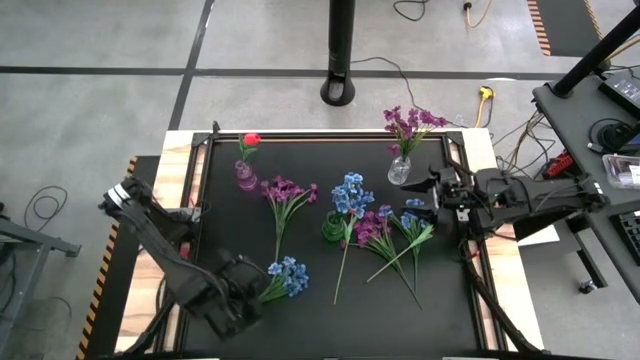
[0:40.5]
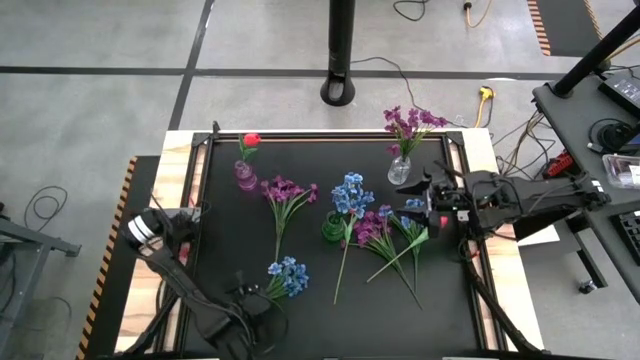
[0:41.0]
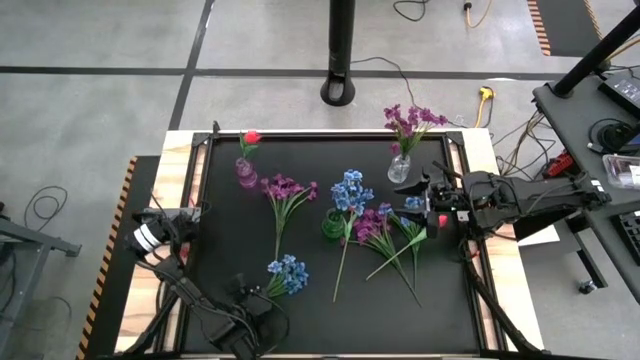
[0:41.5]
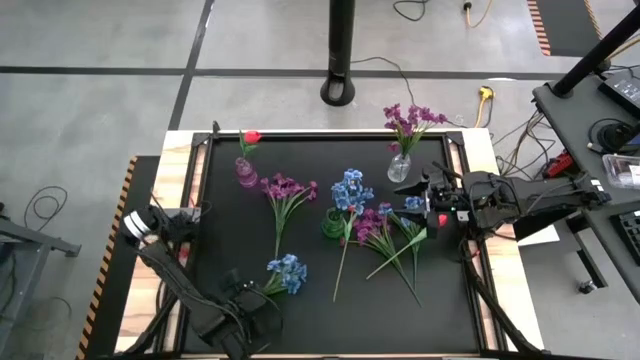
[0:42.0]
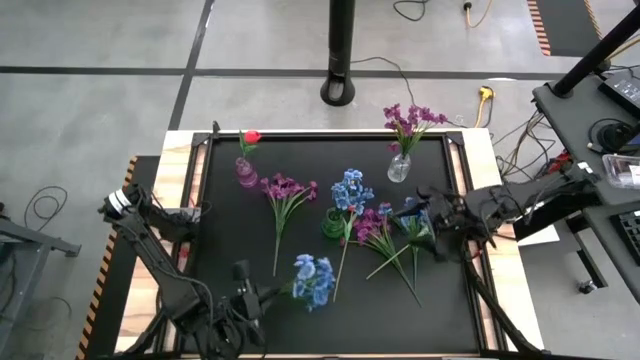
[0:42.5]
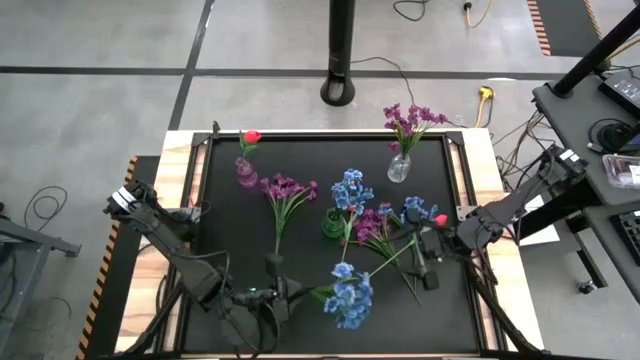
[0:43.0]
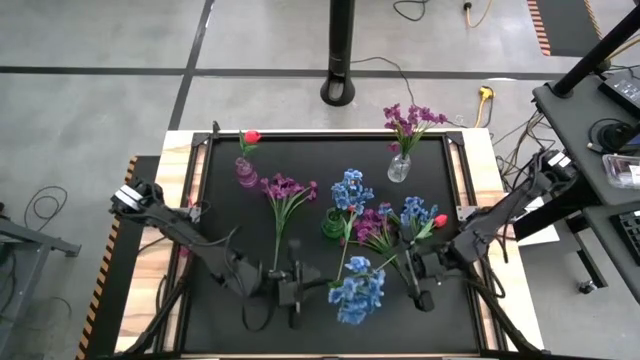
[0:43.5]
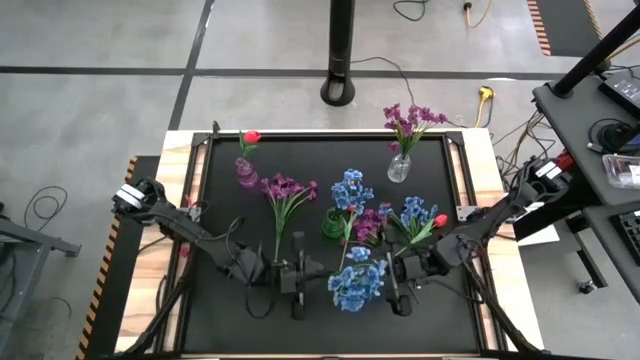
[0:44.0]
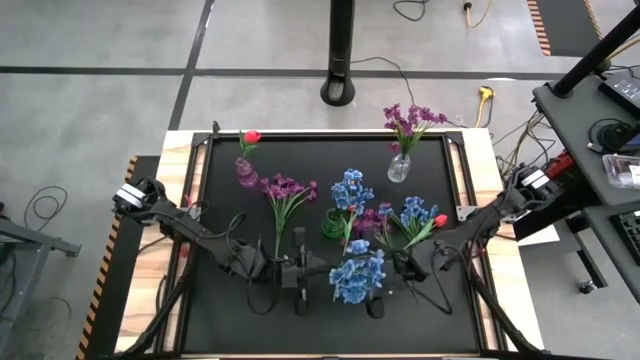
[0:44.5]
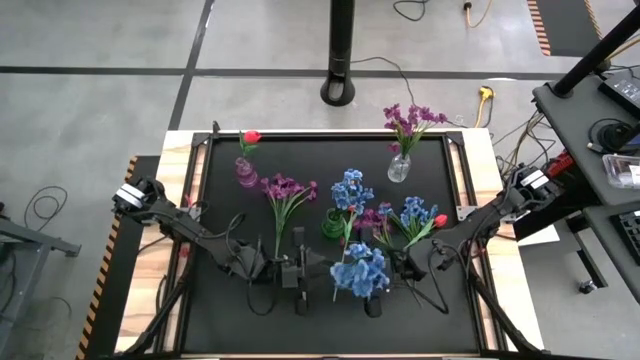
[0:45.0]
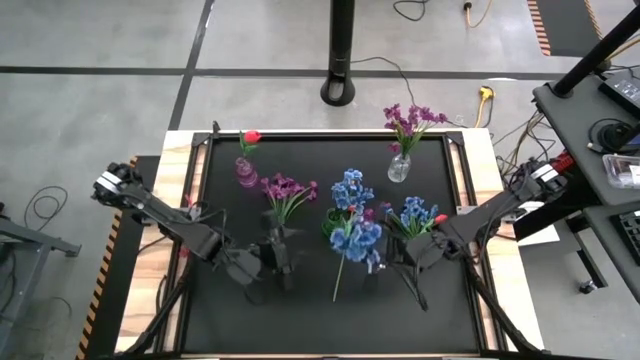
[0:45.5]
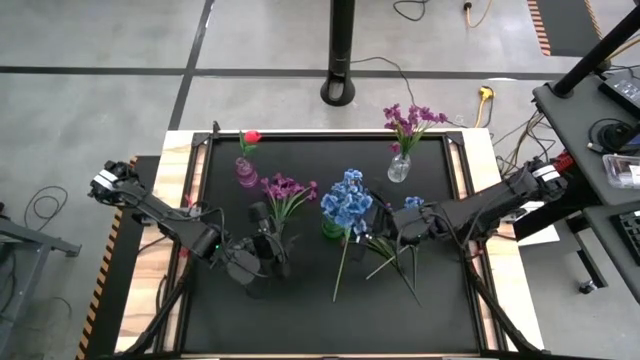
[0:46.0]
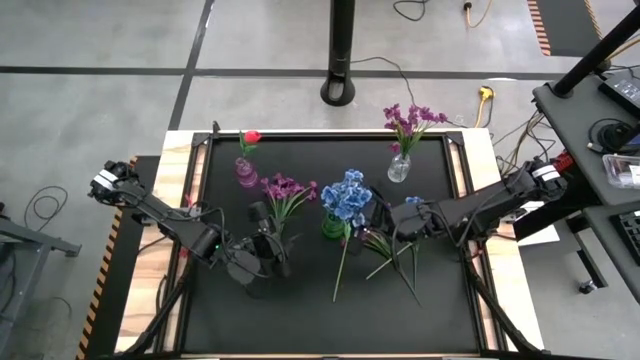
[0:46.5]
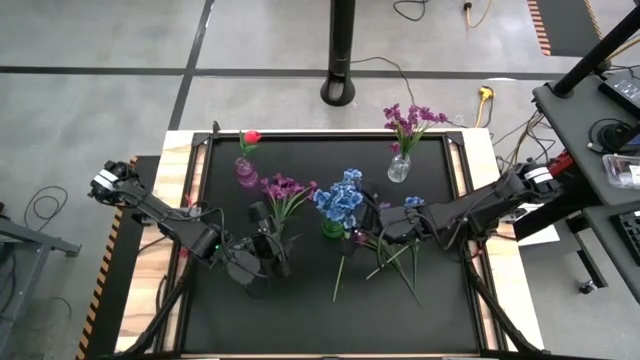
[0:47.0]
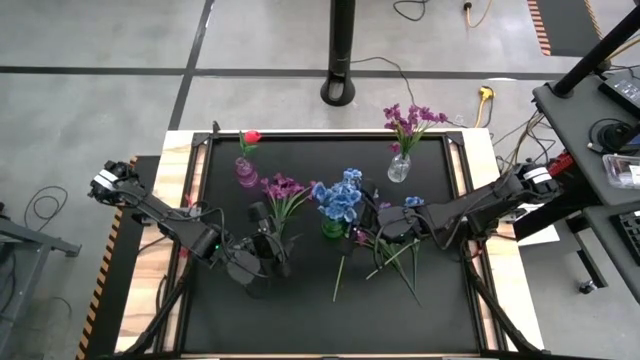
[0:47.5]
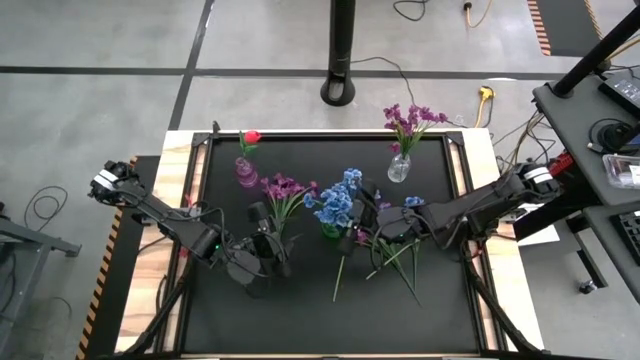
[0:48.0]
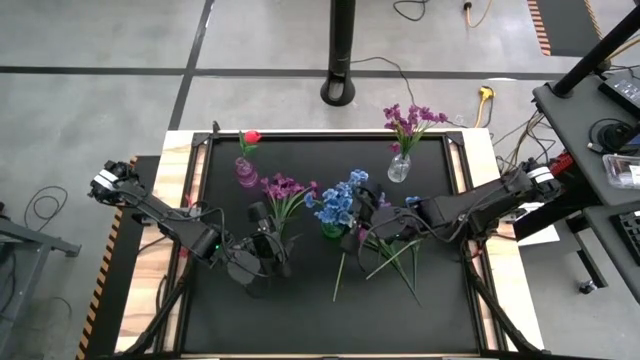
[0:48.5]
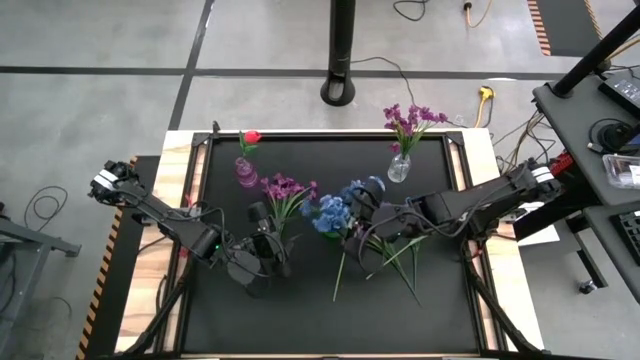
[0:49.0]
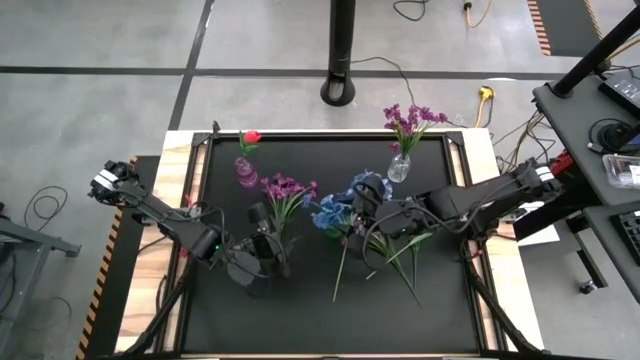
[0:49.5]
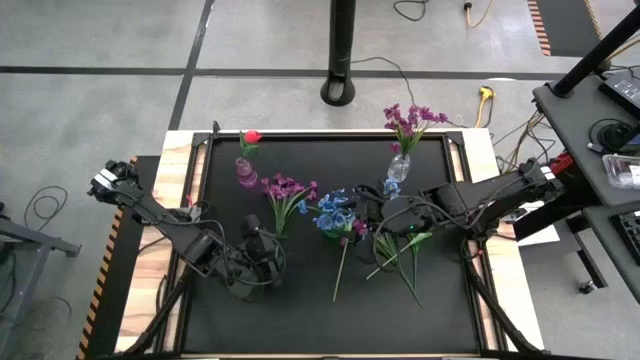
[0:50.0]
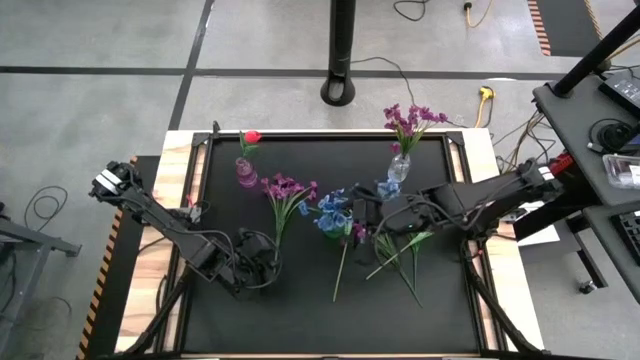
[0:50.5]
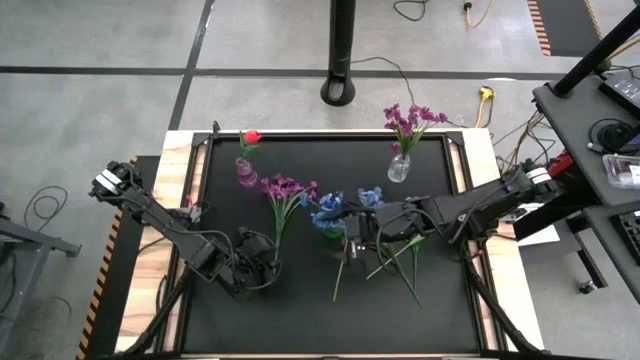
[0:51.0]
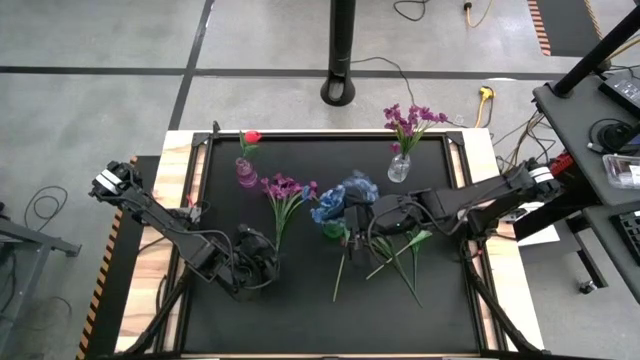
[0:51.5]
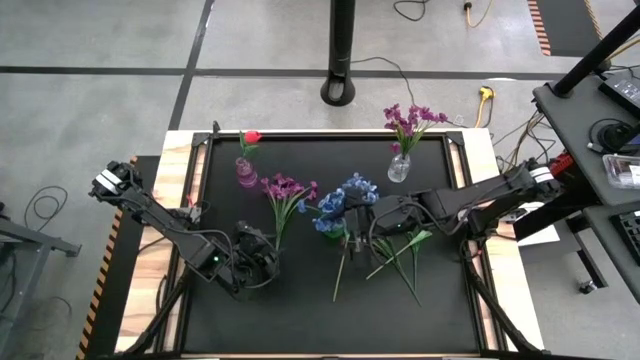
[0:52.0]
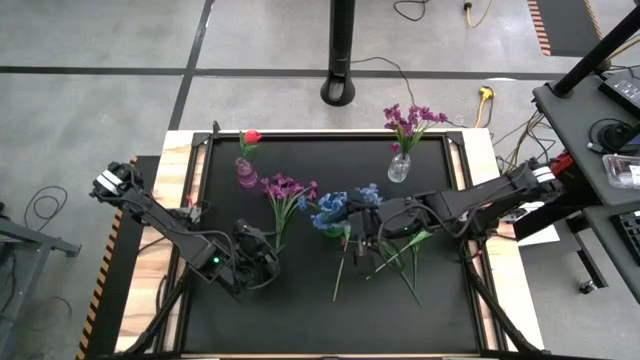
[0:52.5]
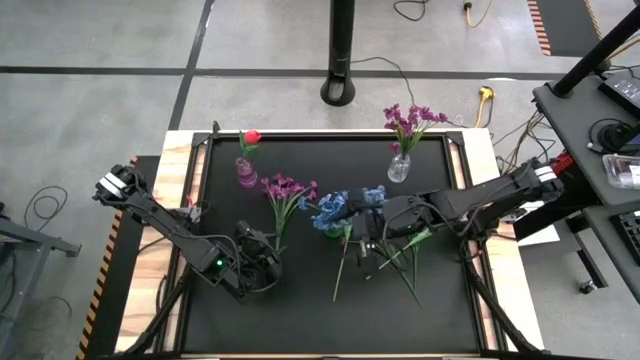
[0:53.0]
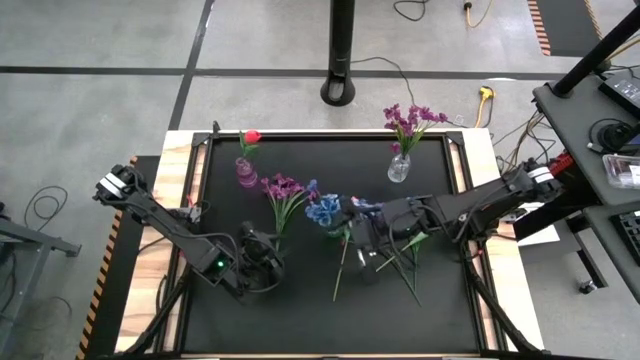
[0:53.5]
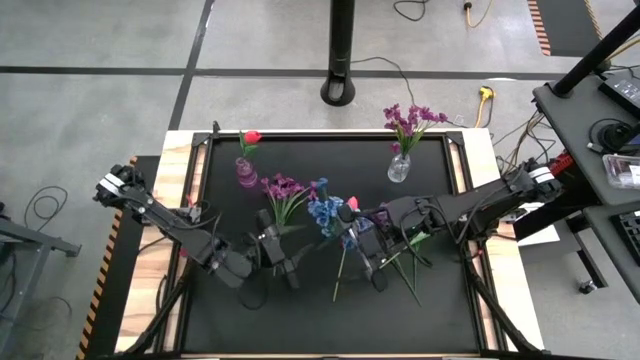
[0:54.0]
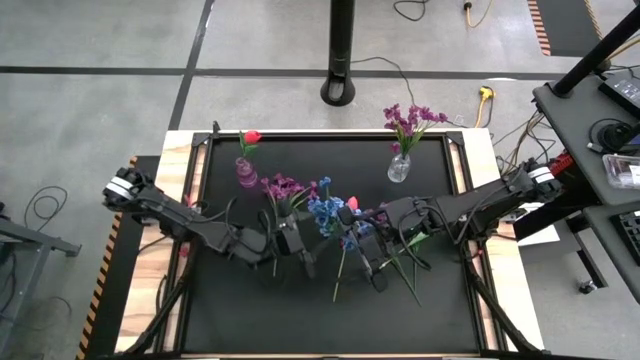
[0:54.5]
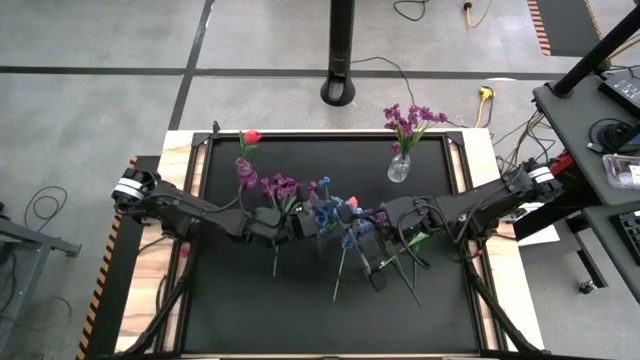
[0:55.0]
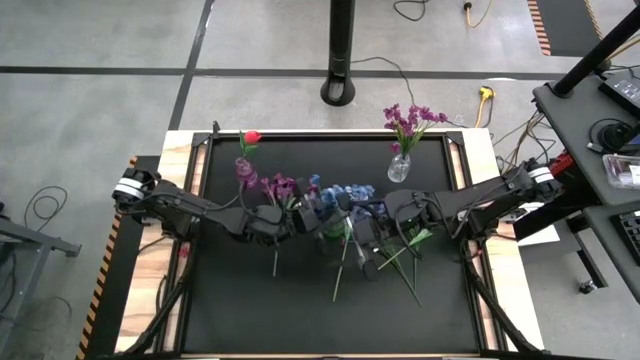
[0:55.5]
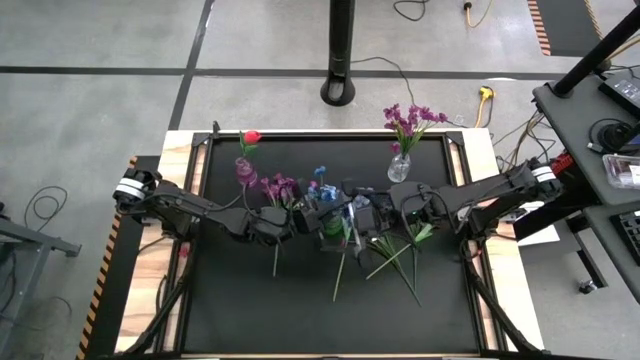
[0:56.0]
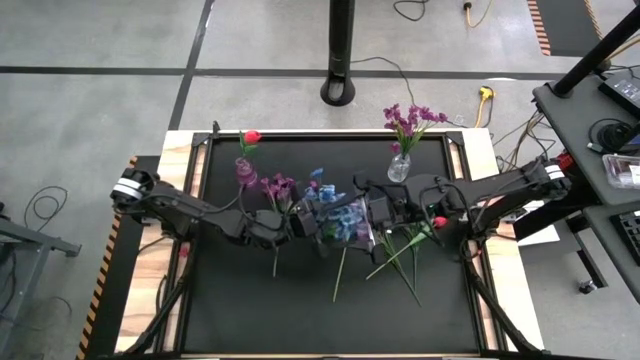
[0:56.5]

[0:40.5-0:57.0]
Task: Sort flowers into vase by color
Put the middle left blue flowers into the green vase

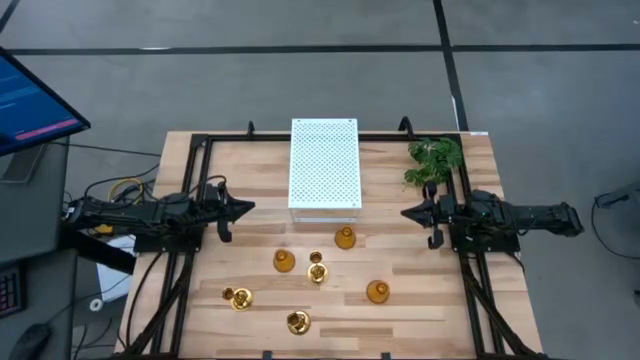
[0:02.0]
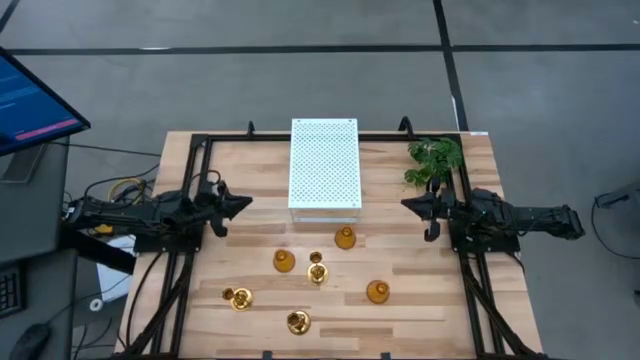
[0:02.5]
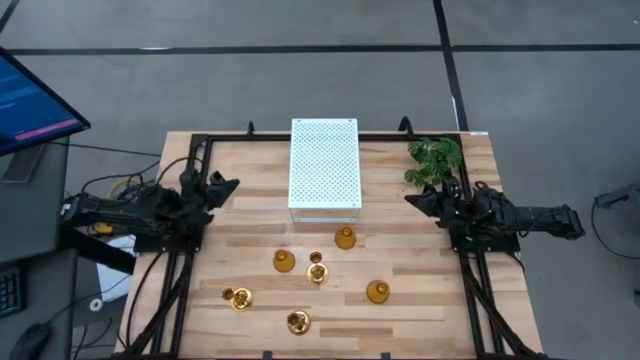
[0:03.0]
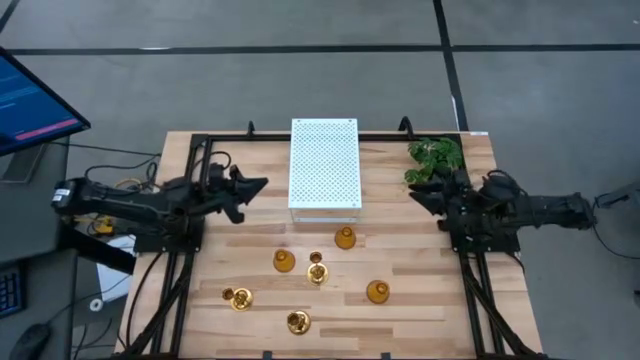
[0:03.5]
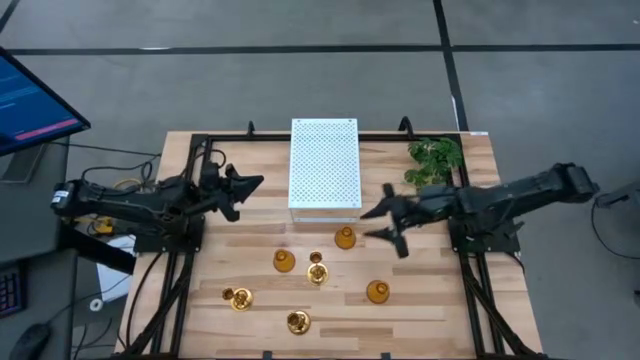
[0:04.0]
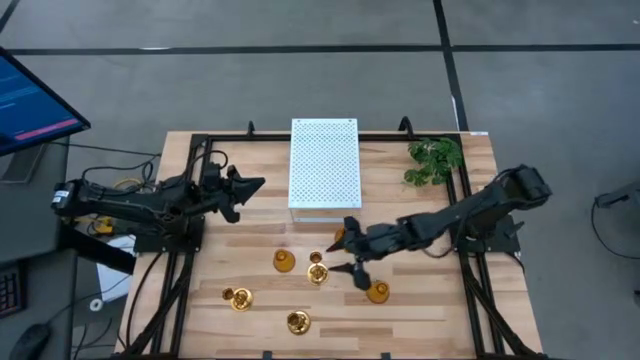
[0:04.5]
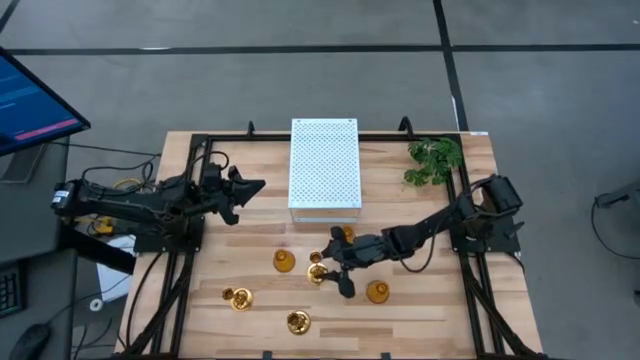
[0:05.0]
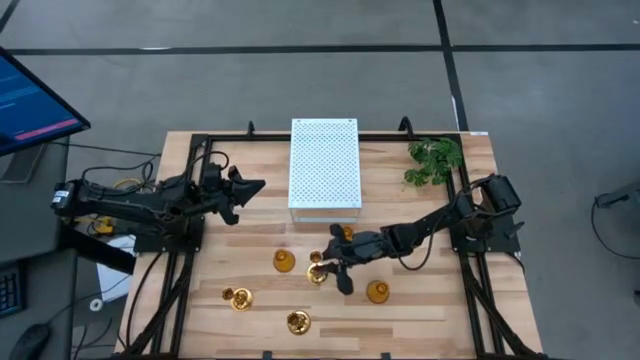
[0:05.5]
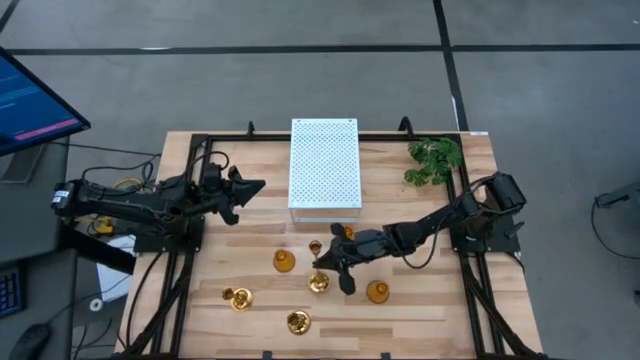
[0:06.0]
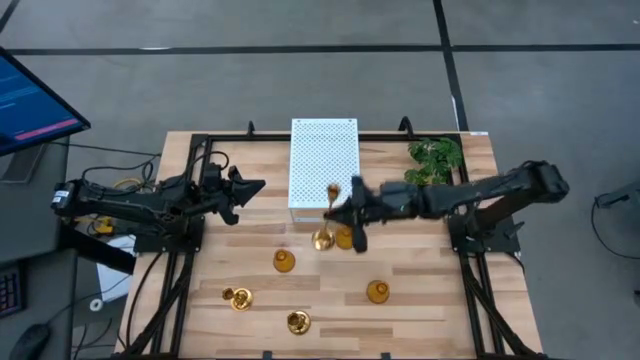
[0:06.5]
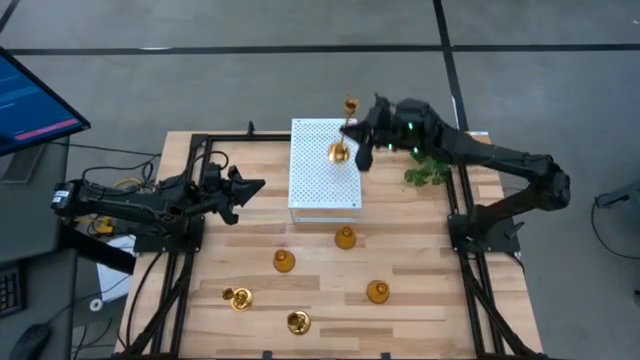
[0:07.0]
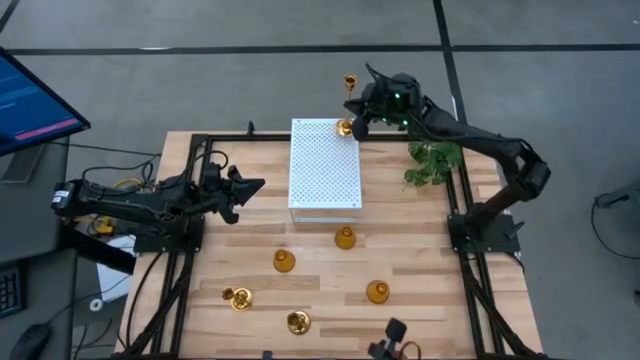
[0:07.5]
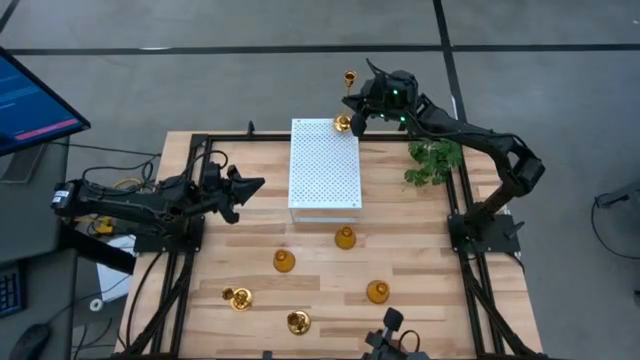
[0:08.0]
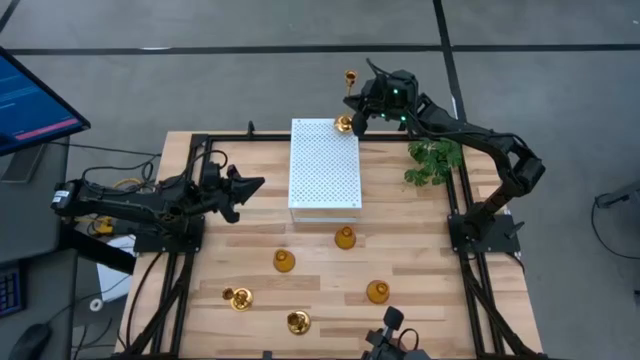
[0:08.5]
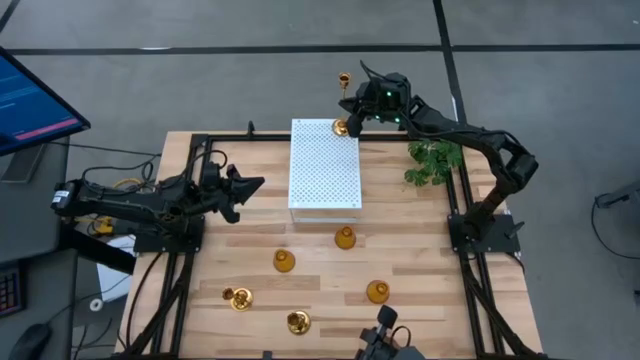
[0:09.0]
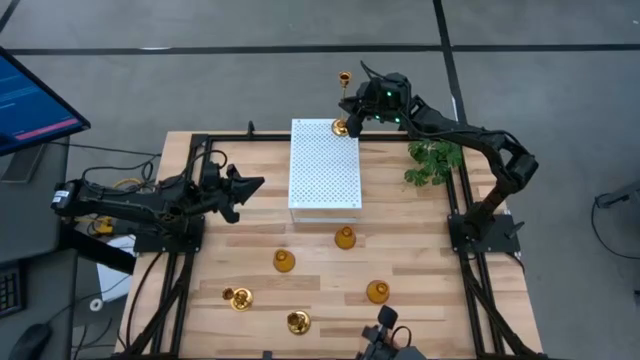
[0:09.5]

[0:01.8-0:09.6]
Task: Pick & Place candle stick holders
Put the right gold candle holder on the shelf
